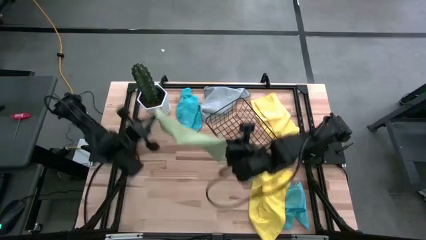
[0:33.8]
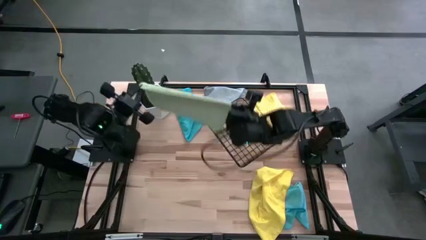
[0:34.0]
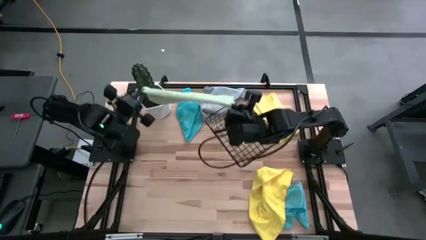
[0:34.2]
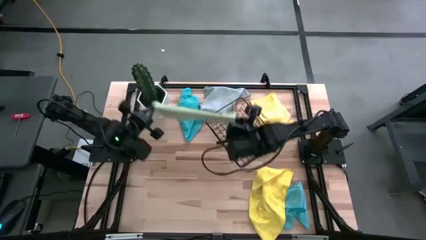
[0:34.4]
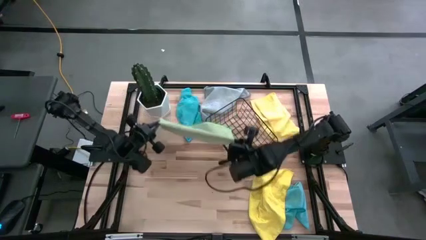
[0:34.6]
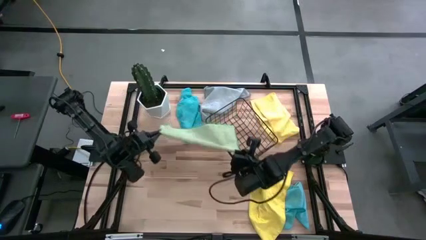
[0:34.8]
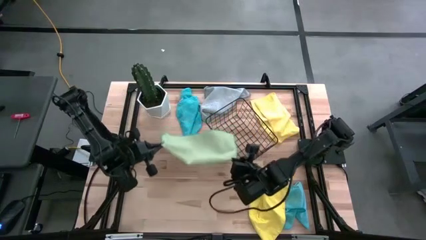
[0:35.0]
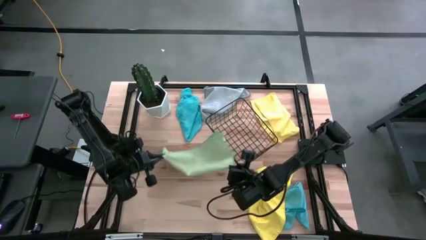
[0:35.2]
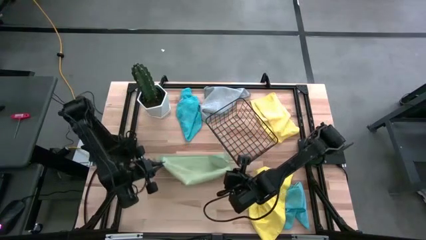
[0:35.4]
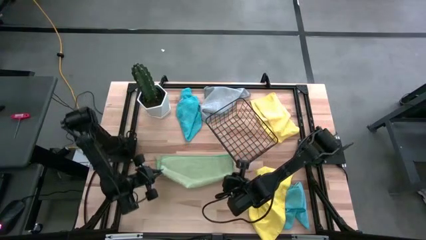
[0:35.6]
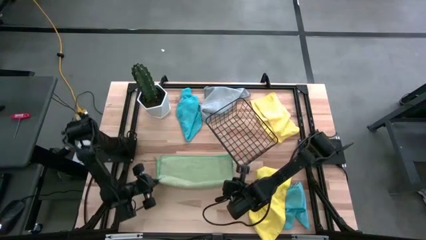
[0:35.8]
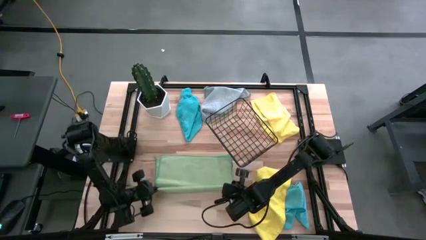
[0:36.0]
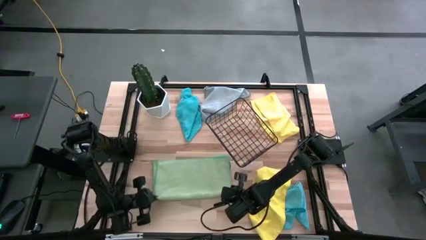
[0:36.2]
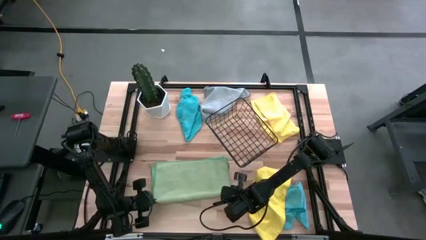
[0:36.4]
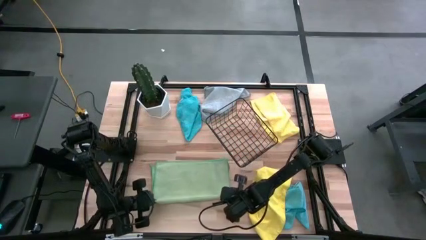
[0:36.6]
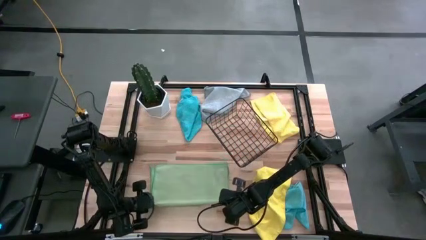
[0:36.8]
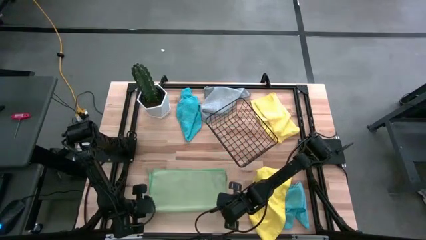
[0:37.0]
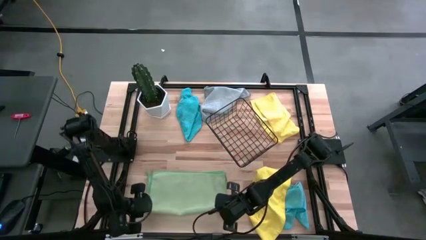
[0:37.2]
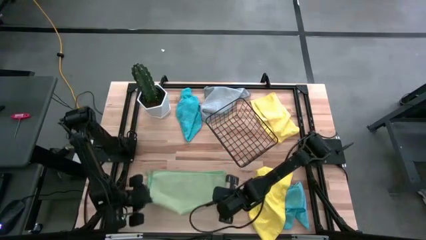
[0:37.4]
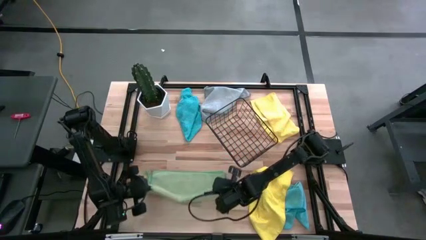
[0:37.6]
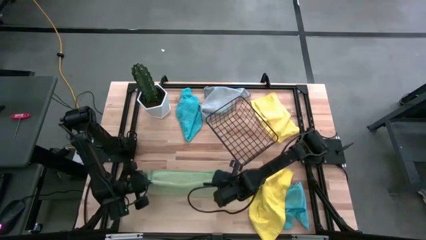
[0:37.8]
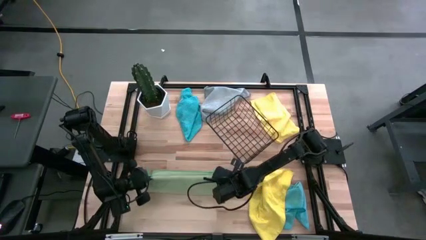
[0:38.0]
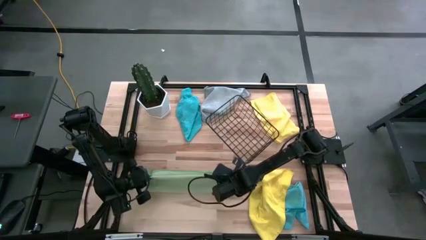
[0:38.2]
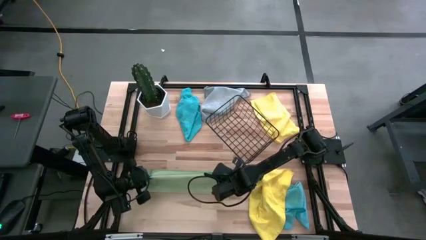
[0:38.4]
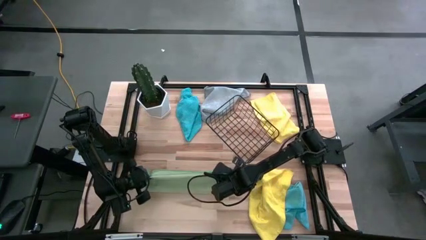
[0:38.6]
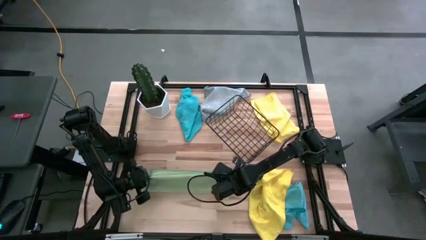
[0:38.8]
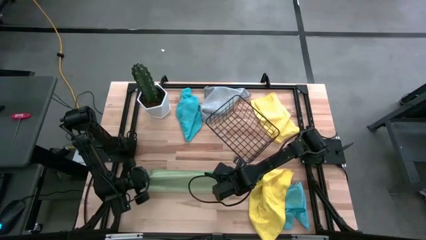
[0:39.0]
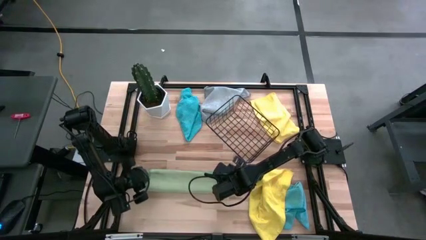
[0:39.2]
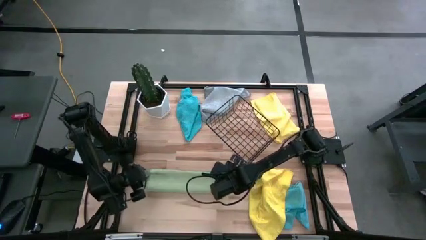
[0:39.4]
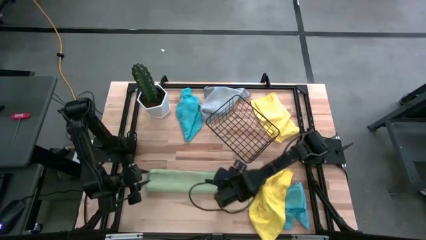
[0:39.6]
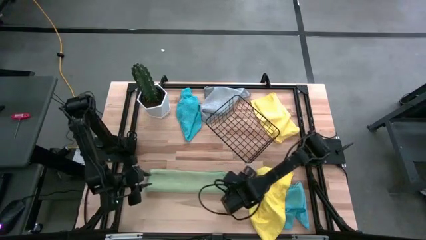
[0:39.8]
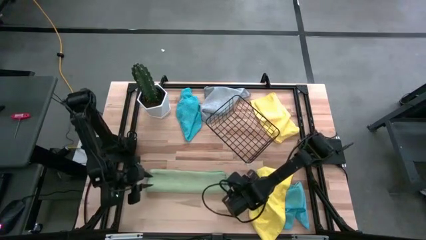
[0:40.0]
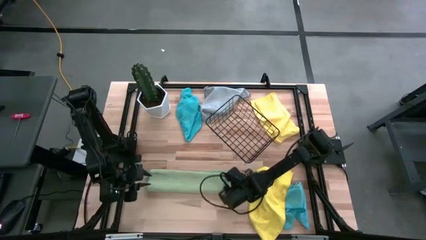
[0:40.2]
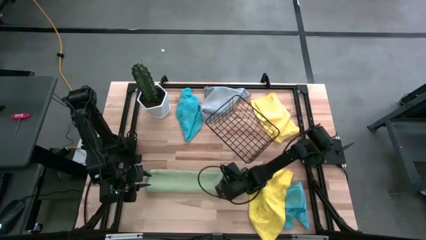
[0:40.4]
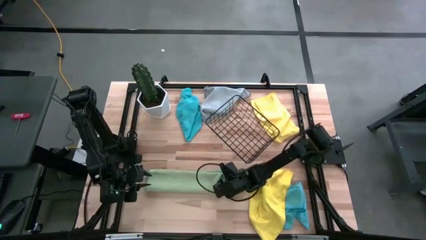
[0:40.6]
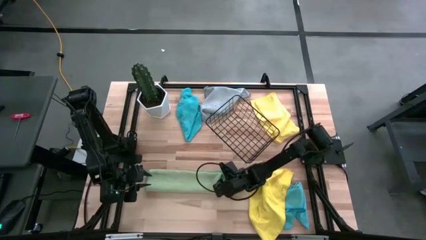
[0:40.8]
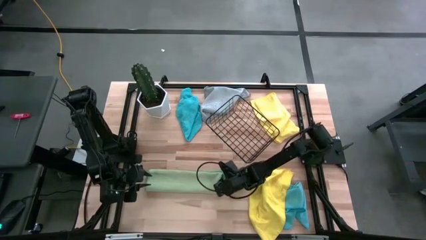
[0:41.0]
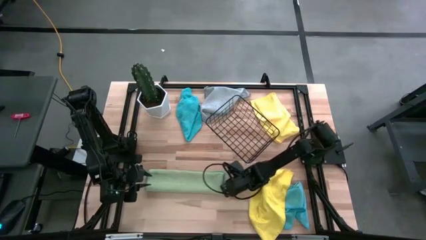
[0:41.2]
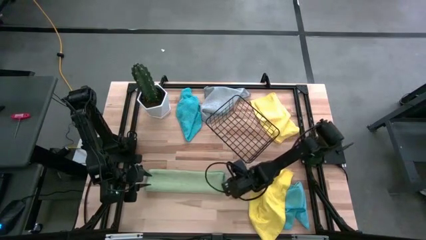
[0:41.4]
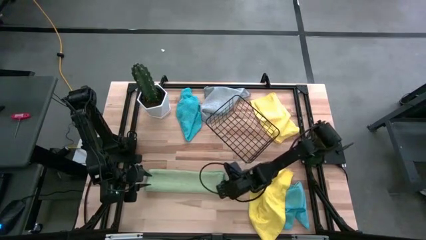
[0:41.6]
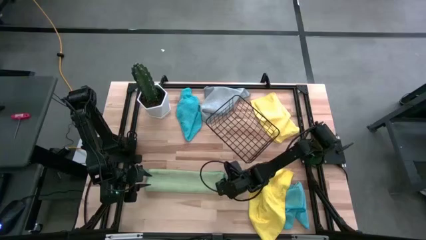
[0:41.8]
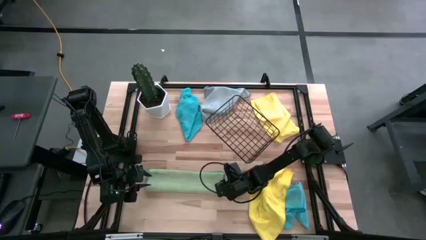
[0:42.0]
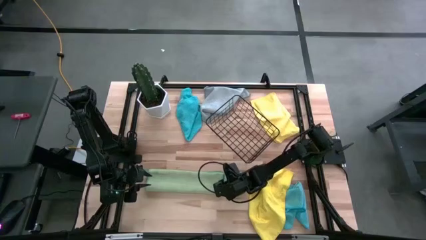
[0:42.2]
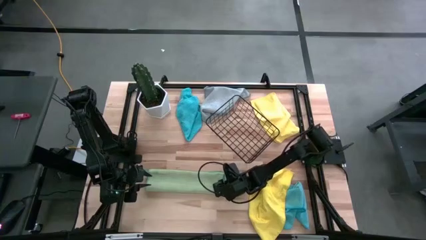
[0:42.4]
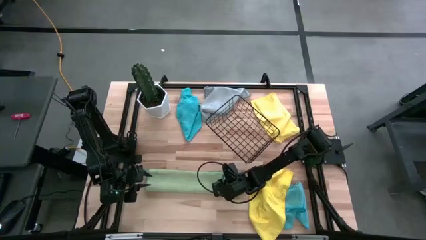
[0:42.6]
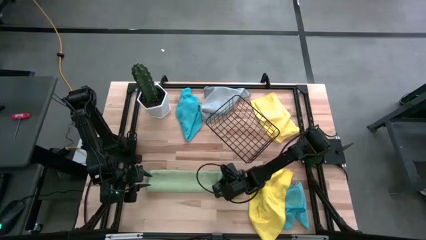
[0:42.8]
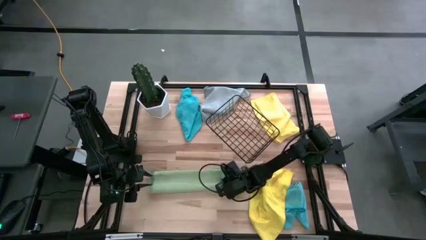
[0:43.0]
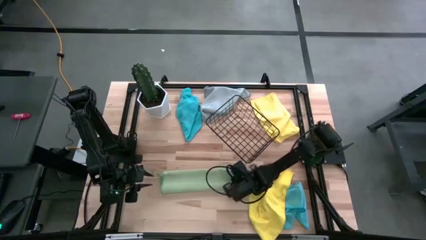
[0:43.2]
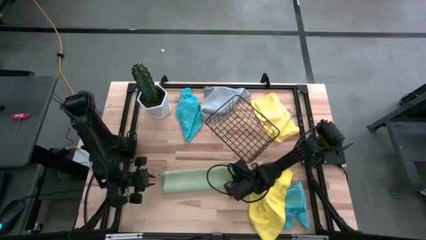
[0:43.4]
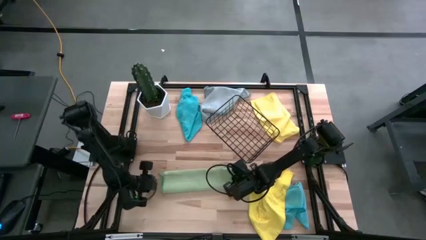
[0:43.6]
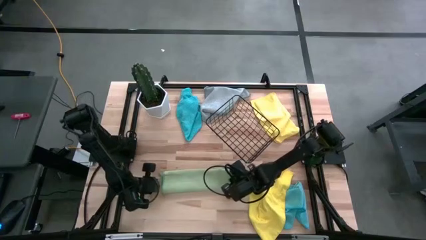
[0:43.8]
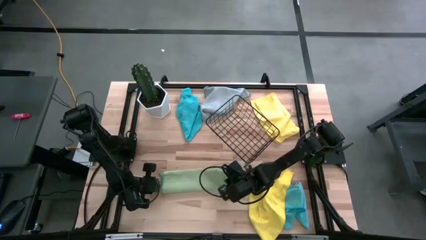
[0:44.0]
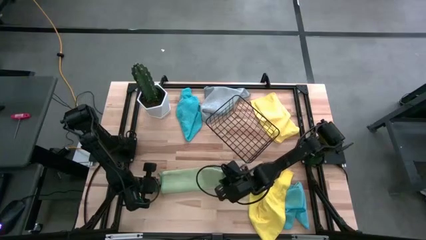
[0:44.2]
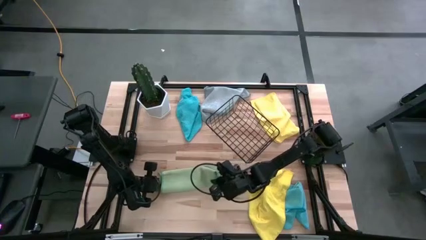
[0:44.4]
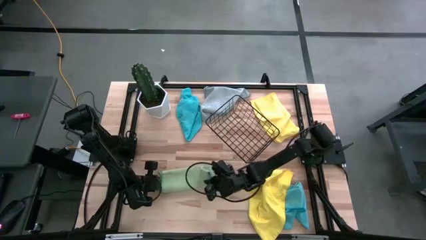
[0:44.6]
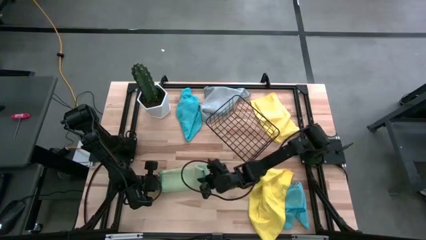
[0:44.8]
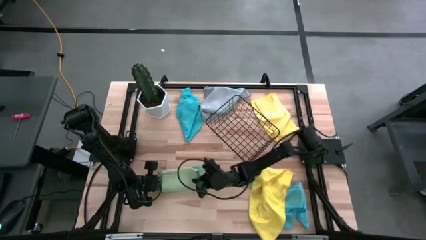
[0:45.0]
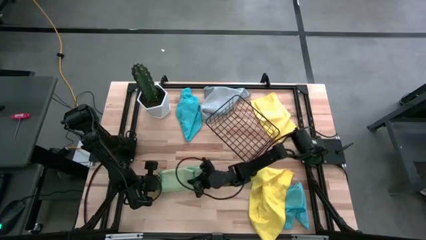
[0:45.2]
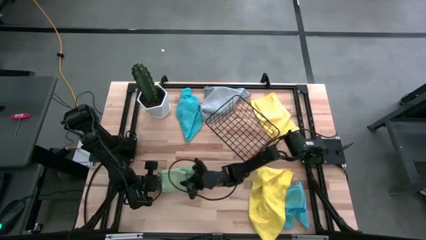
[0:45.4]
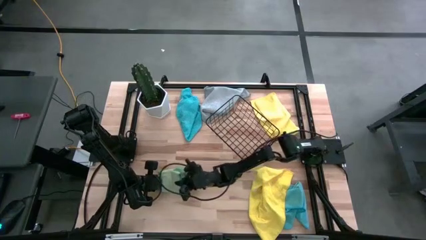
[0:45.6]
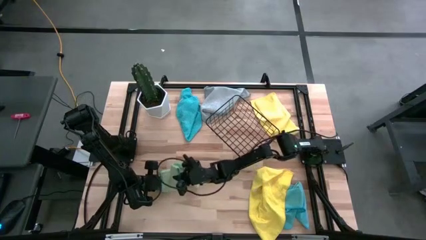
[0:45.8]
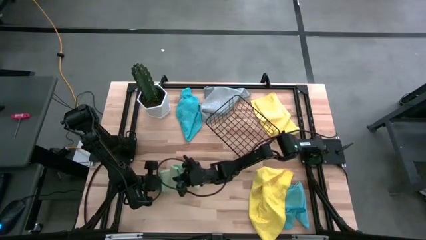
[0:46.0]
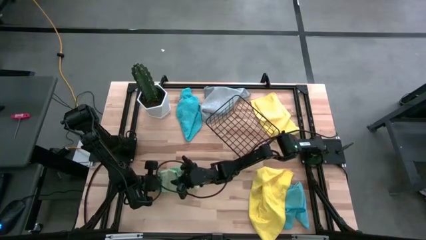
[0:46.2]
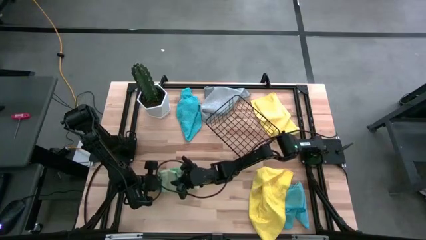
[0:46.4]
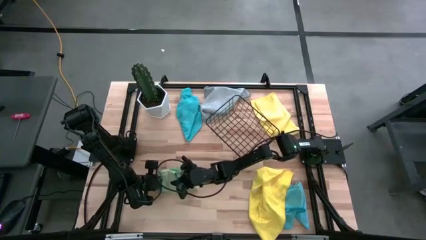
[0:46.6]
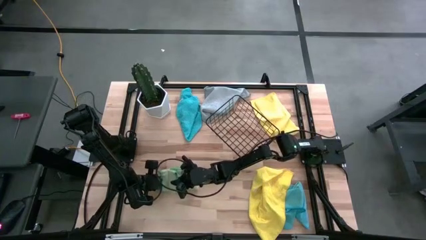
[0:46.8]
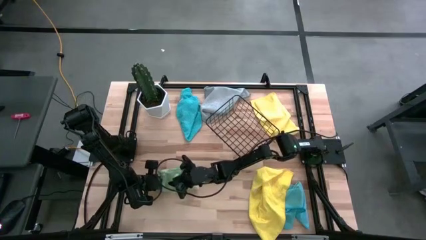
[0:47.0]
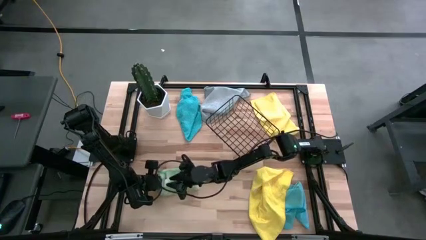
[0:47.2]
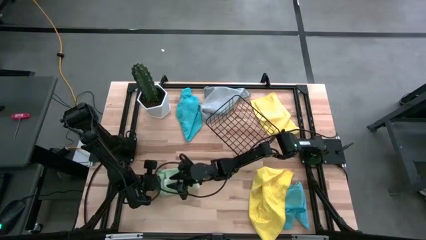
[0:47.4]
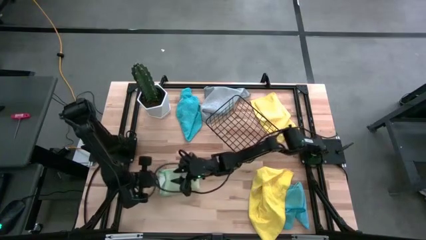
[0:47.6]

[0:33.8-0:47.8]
Task: Fold microfiber towels
Fold the green microfiber towel
